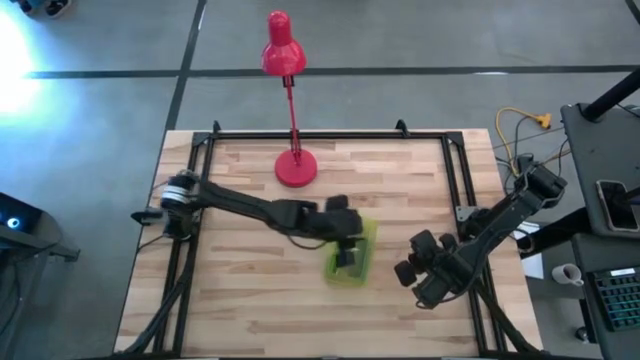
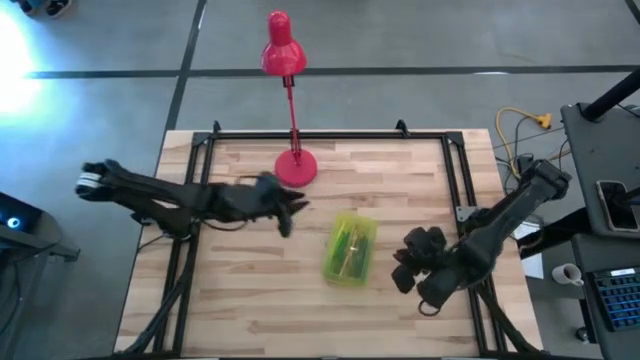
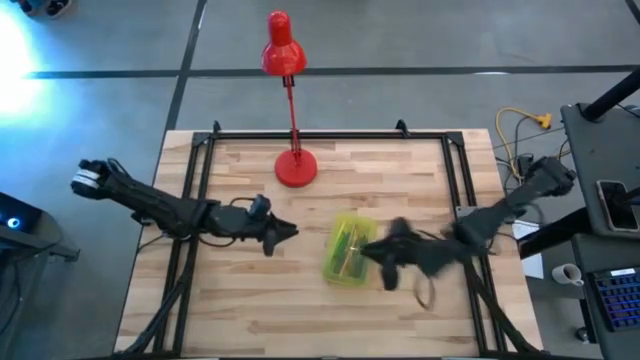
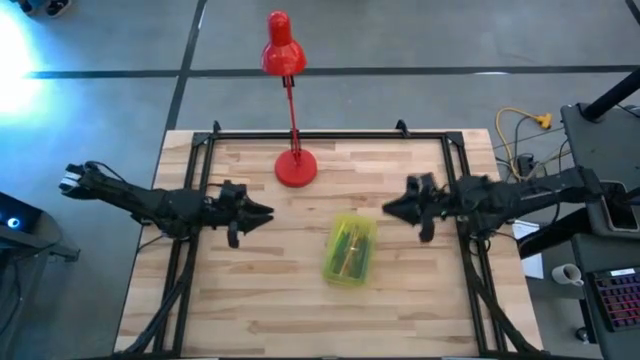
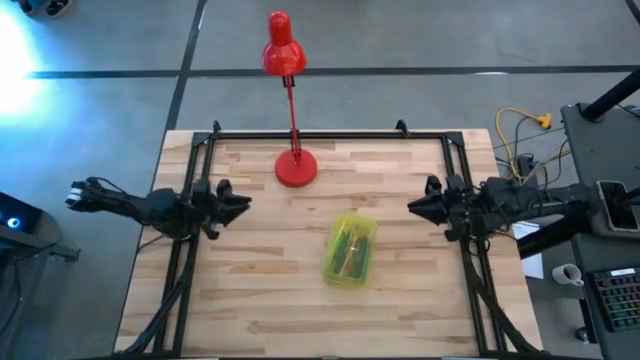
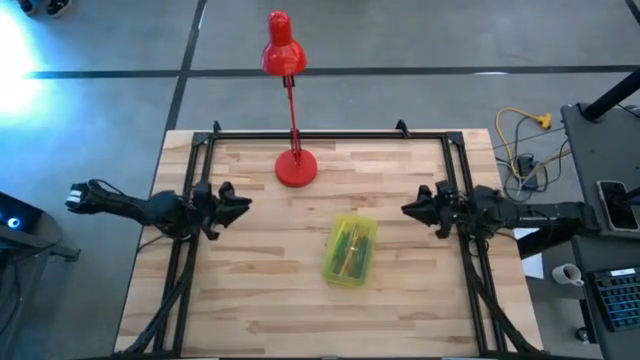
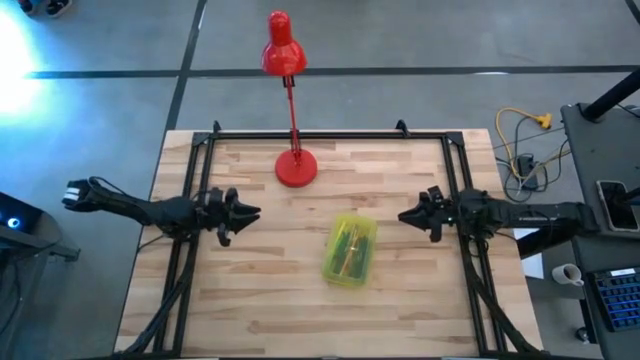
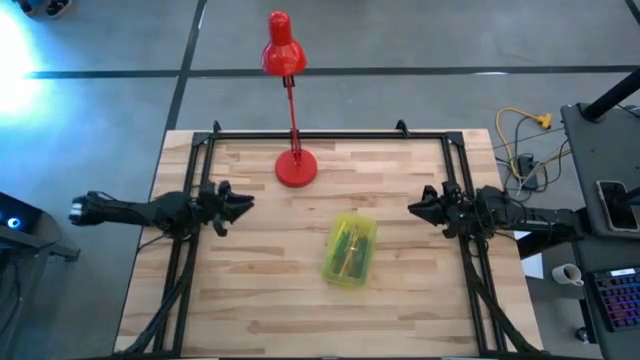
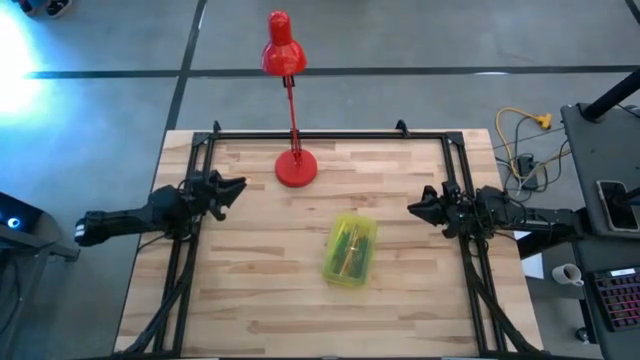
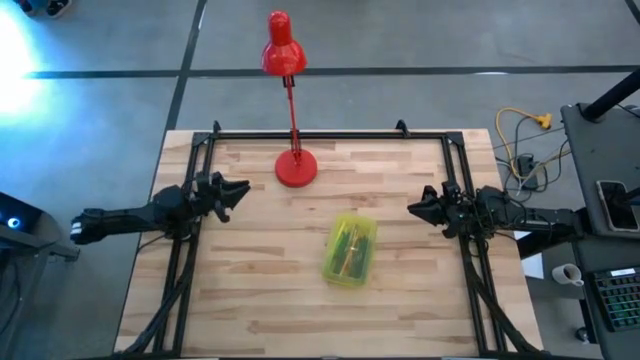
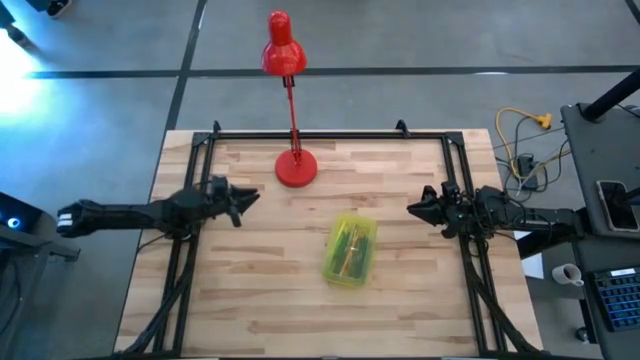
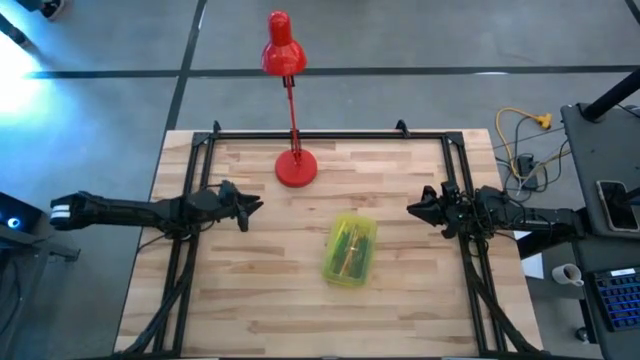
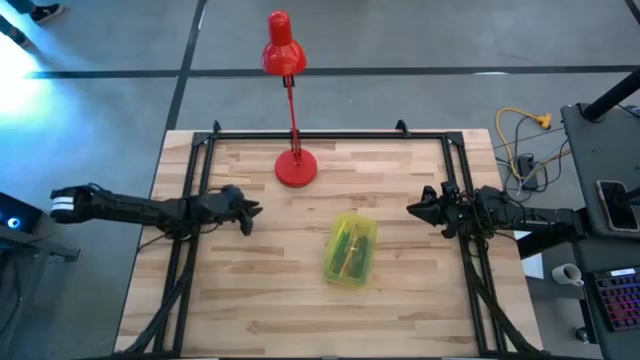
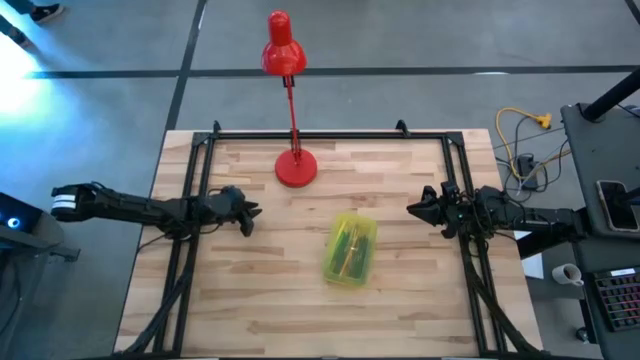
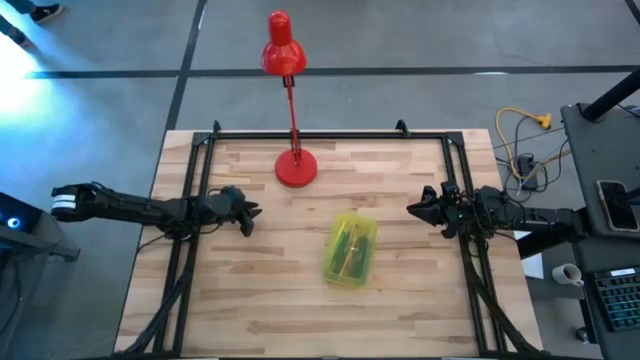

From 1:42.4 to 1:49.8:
Task: Pick & place school supplies into a supply box
Return to Home Position

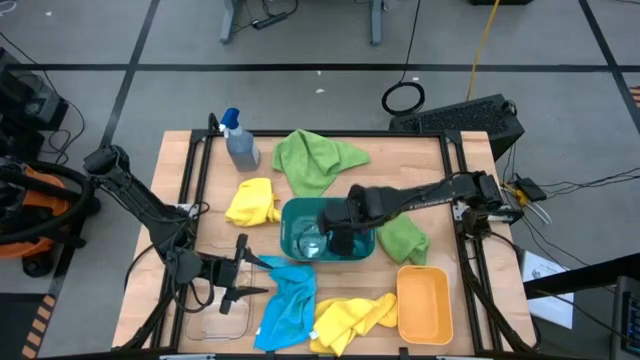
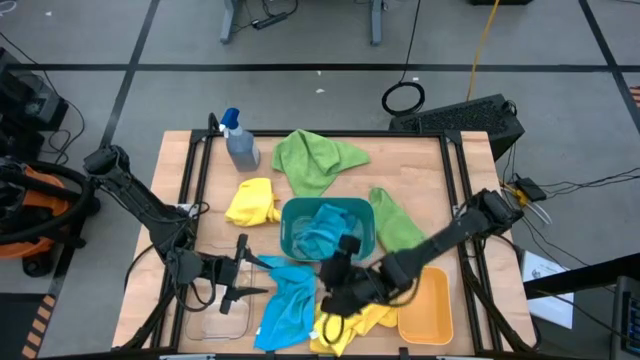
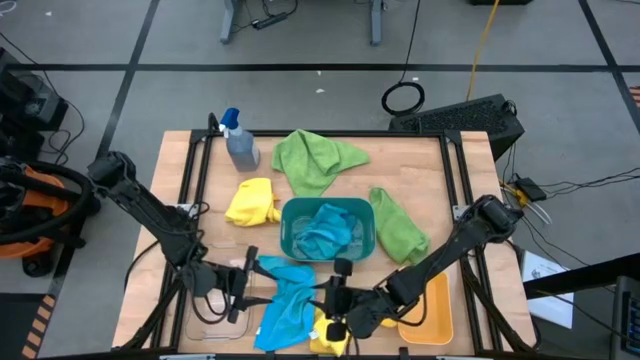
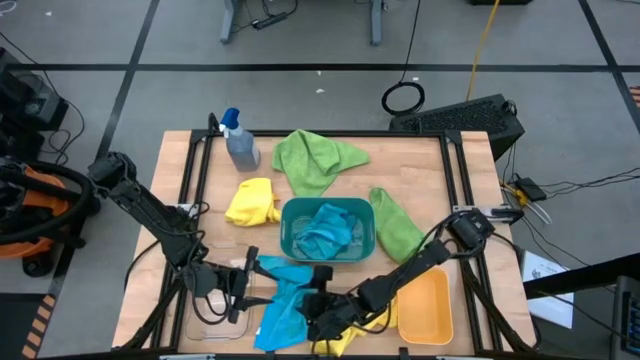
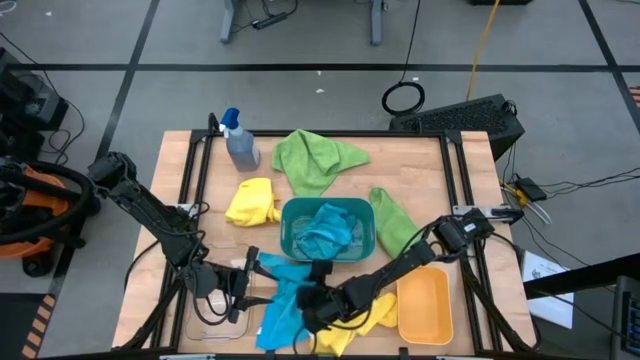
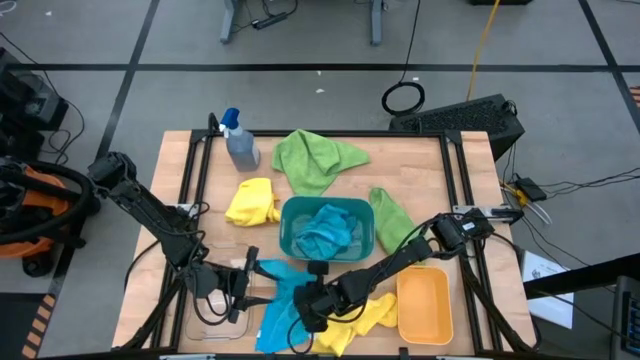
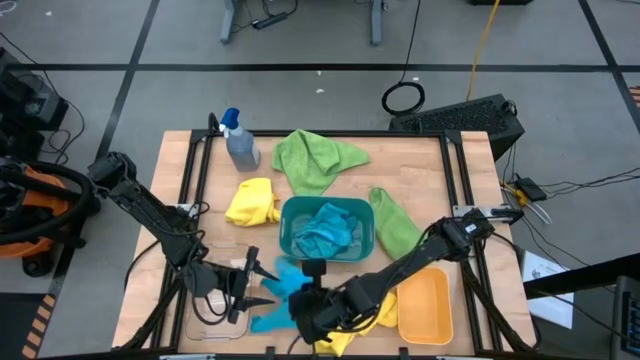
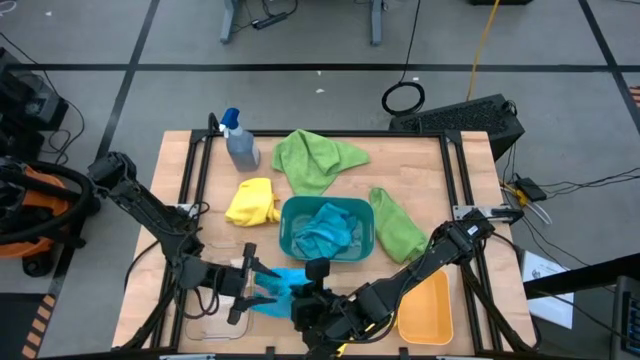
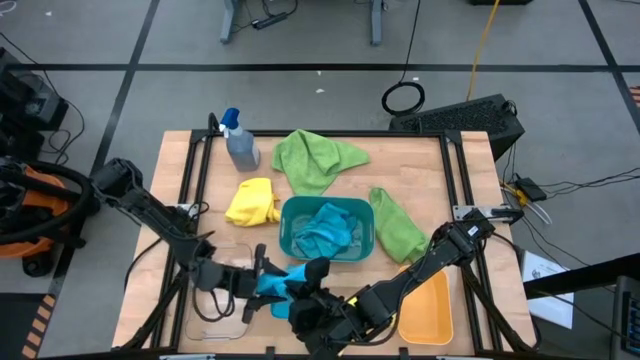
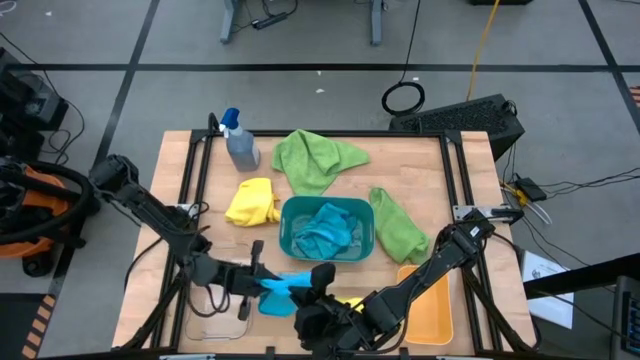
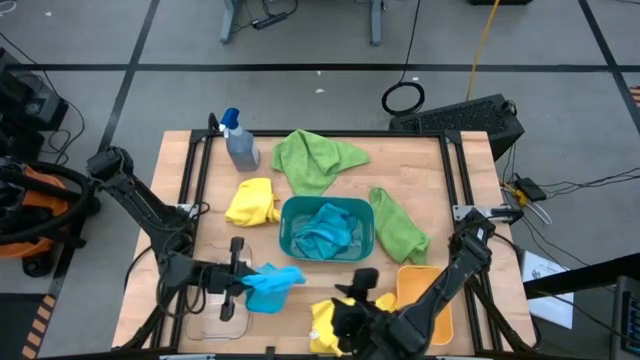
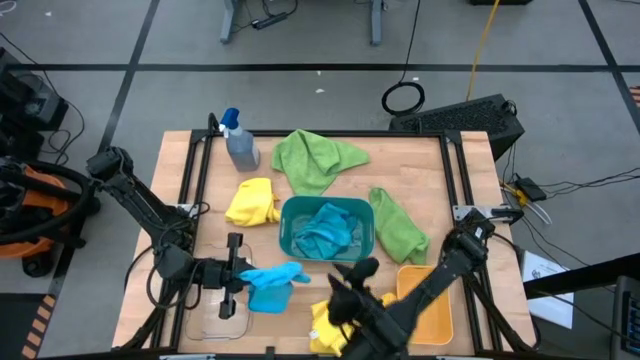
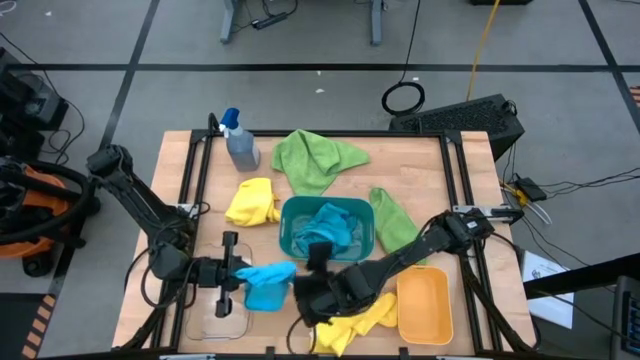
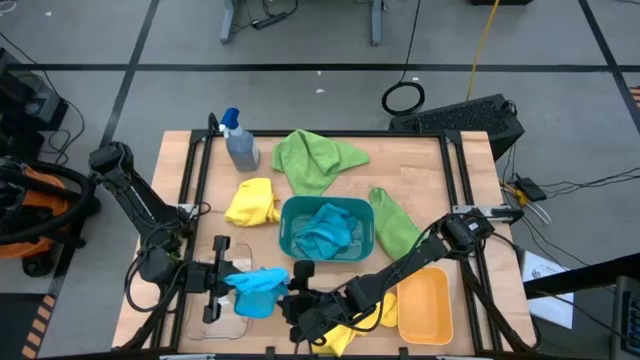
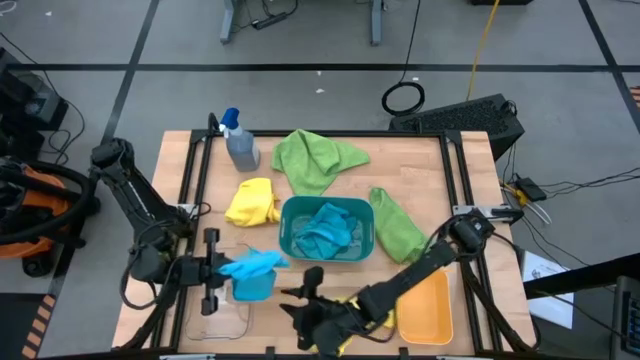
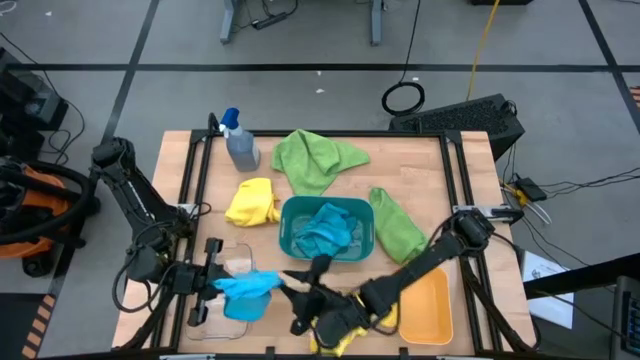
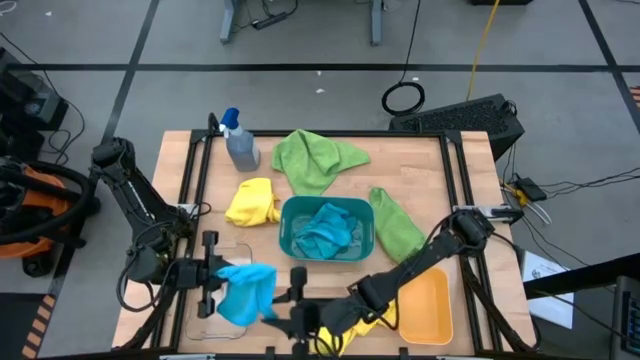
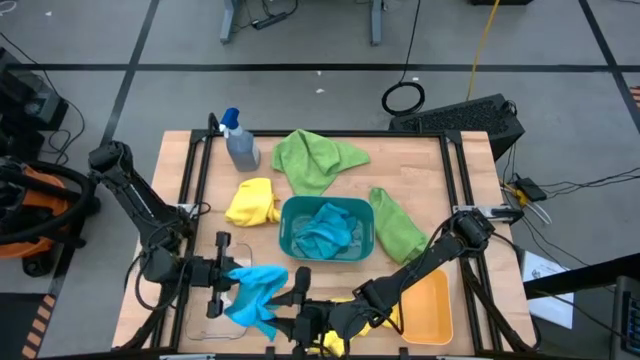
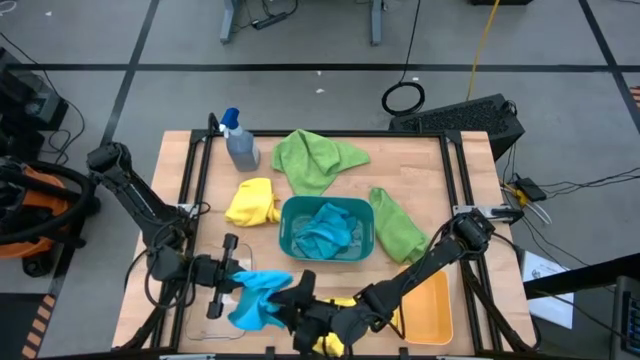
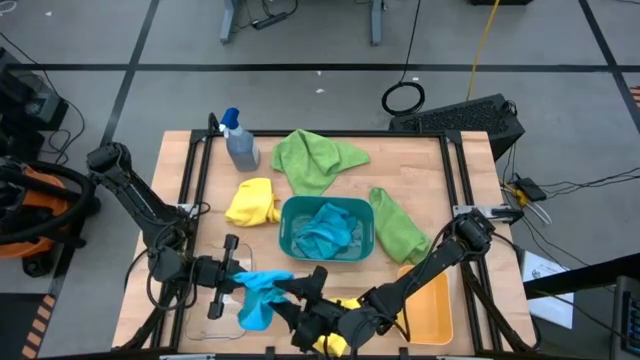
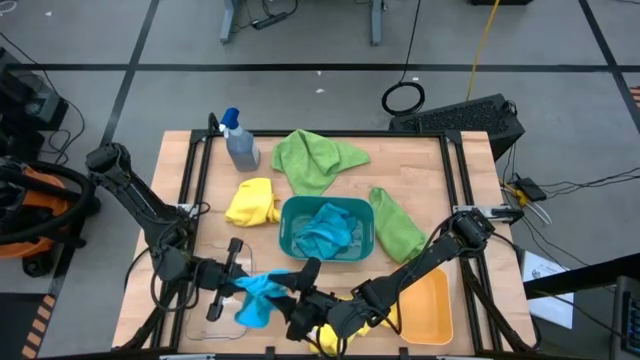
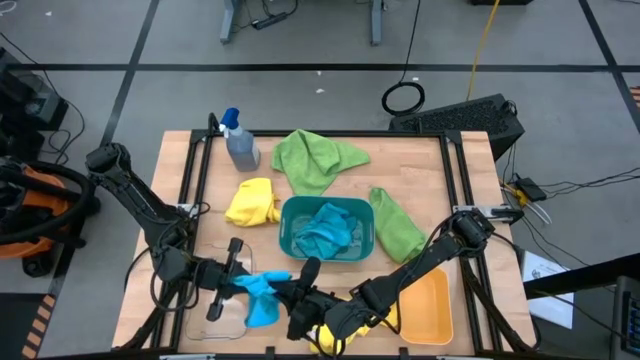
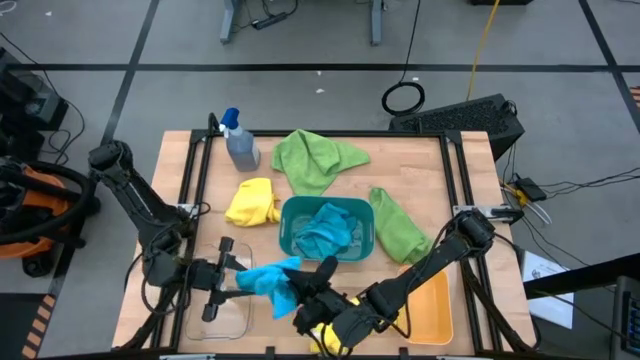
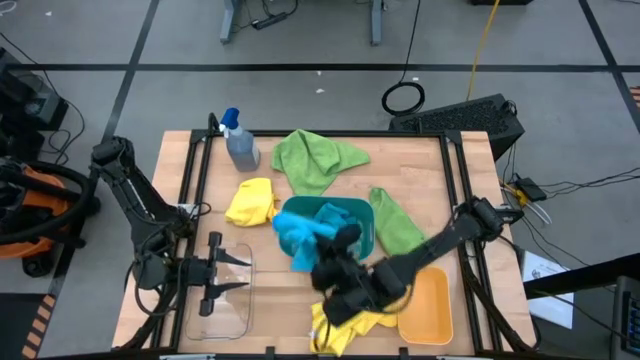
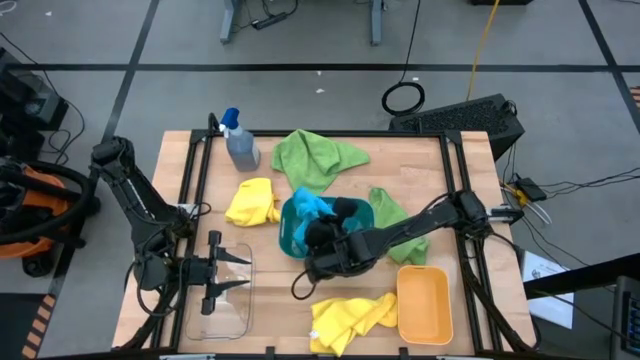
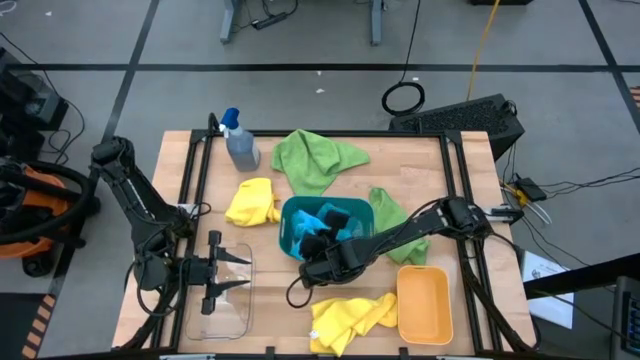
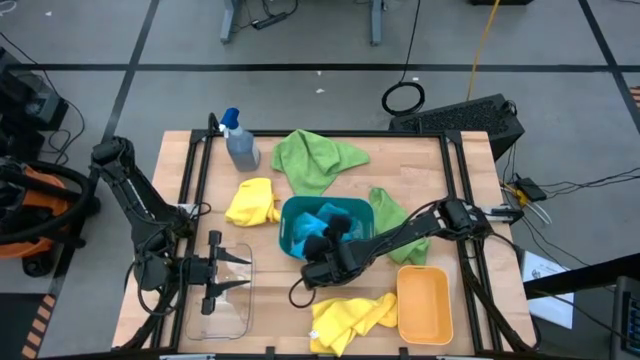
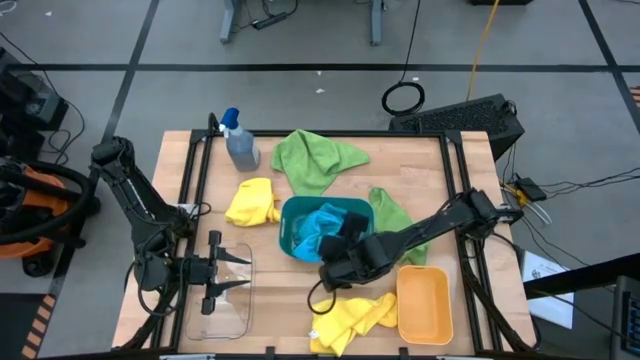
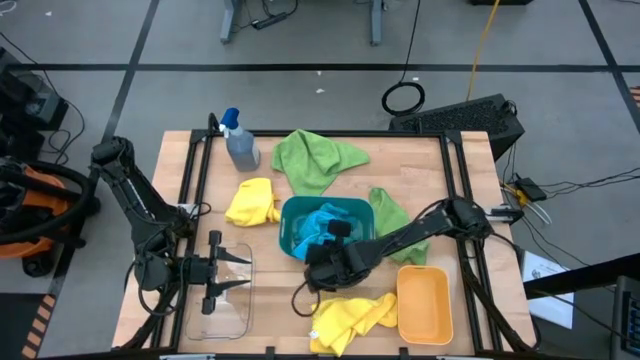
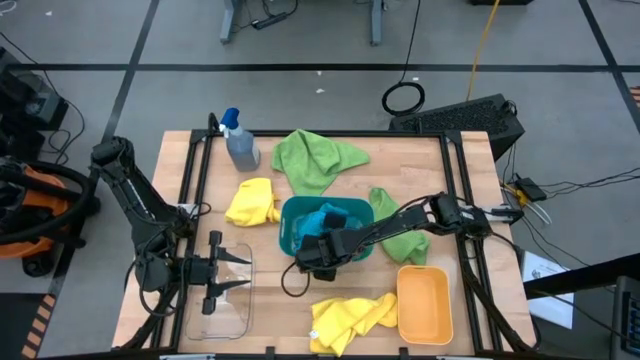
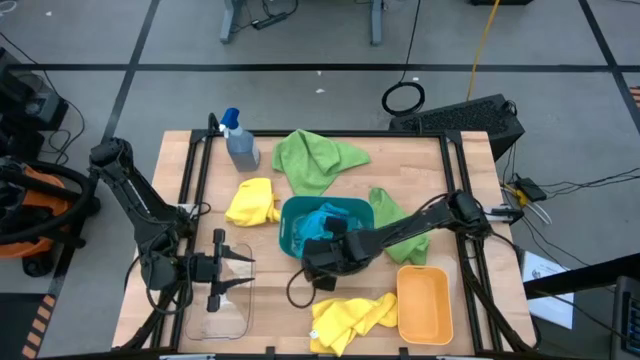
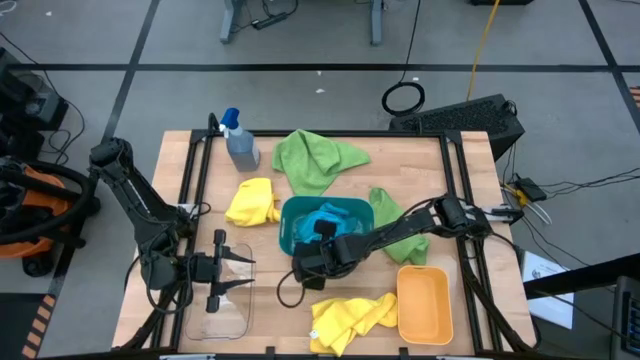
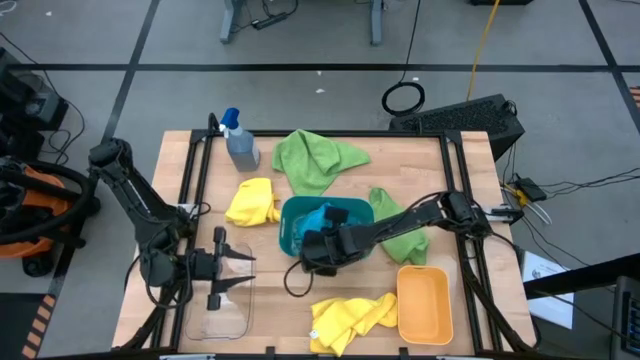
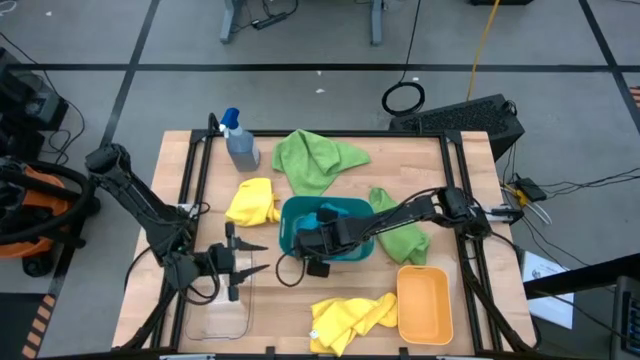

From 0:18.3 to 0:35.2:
Task: Sort microfiber towel by color & place in baskets
Put the blue microfiber towel into the blue bin
